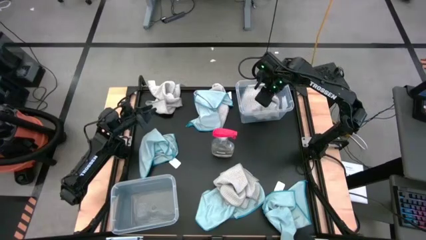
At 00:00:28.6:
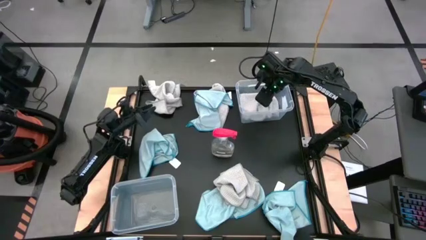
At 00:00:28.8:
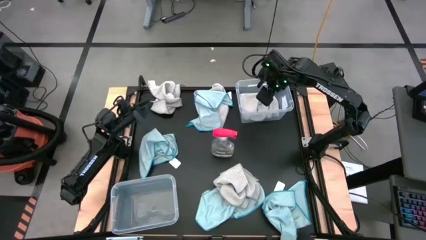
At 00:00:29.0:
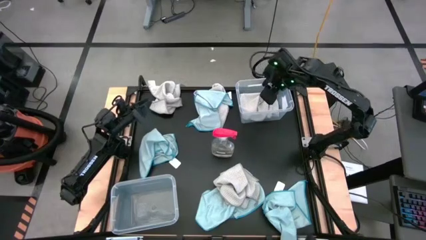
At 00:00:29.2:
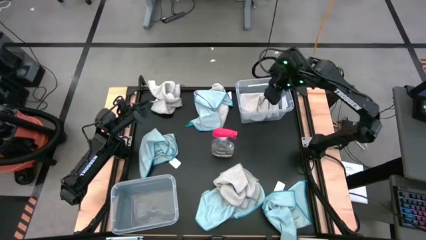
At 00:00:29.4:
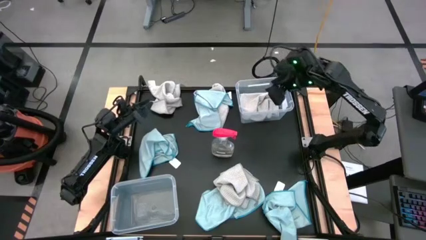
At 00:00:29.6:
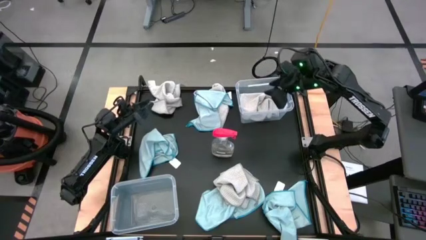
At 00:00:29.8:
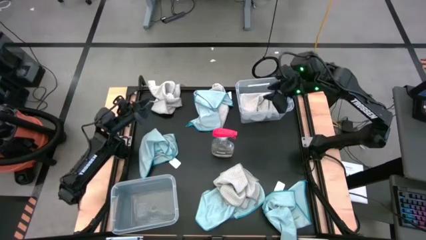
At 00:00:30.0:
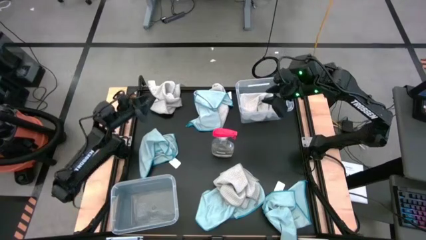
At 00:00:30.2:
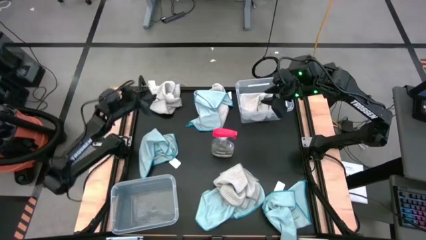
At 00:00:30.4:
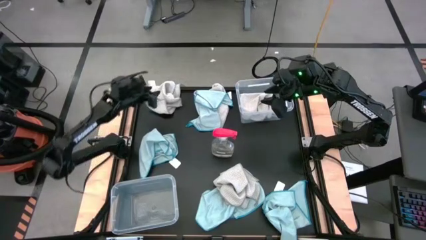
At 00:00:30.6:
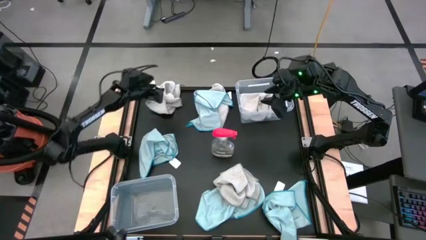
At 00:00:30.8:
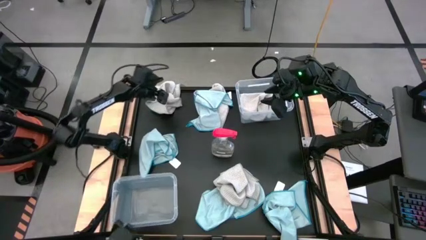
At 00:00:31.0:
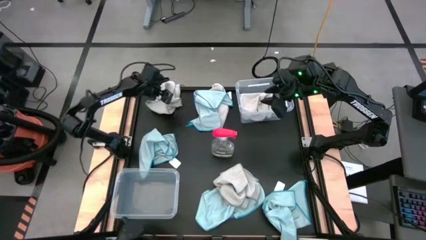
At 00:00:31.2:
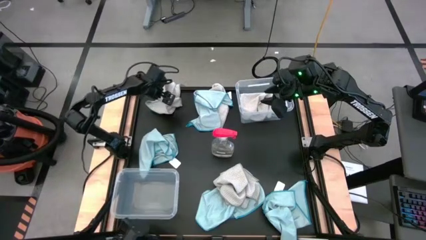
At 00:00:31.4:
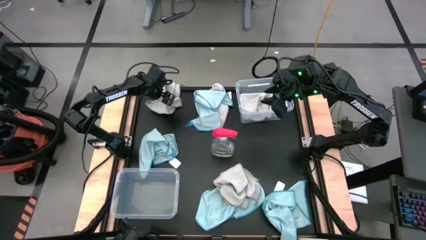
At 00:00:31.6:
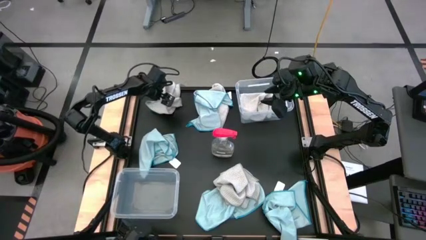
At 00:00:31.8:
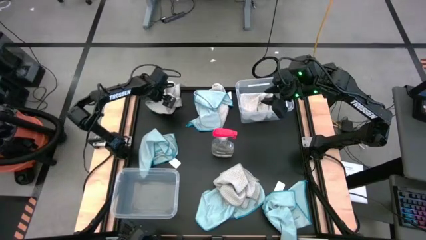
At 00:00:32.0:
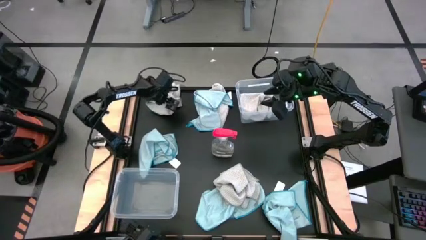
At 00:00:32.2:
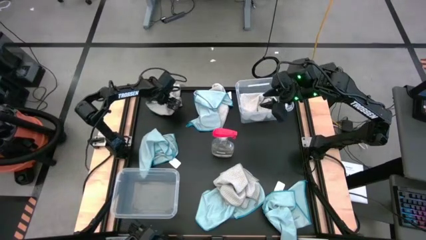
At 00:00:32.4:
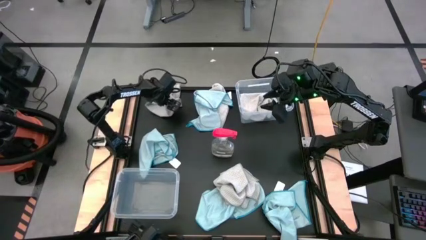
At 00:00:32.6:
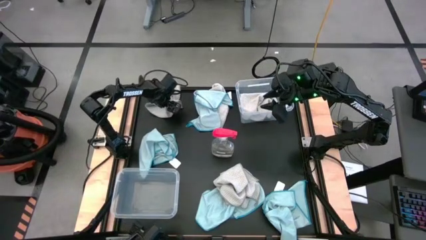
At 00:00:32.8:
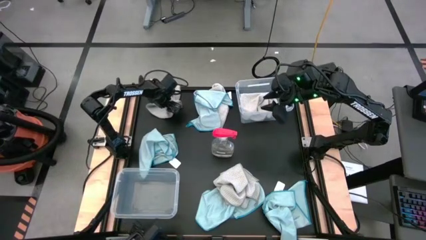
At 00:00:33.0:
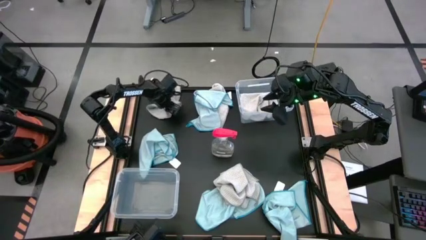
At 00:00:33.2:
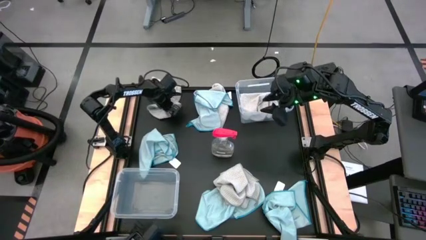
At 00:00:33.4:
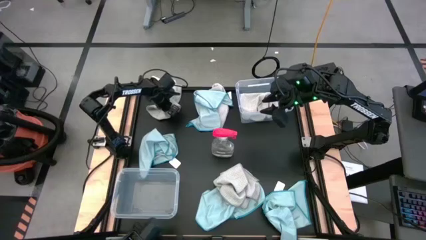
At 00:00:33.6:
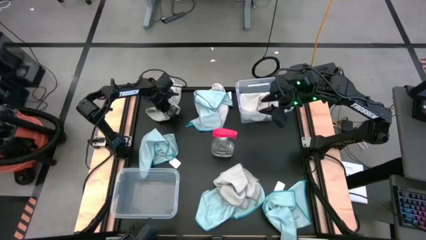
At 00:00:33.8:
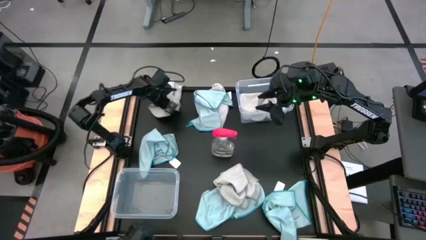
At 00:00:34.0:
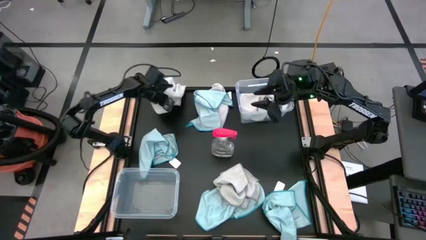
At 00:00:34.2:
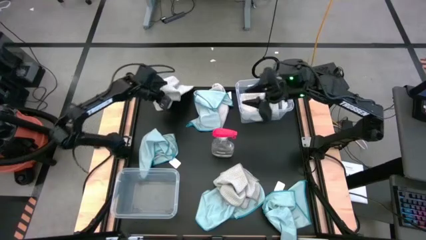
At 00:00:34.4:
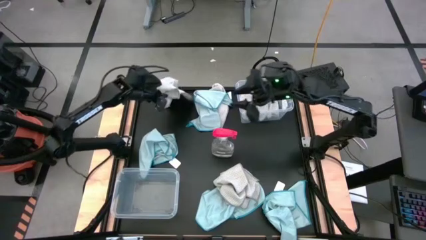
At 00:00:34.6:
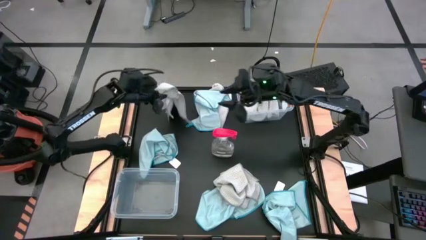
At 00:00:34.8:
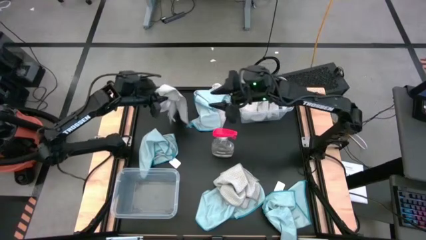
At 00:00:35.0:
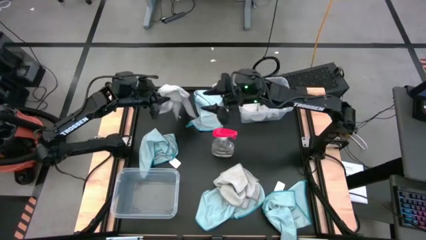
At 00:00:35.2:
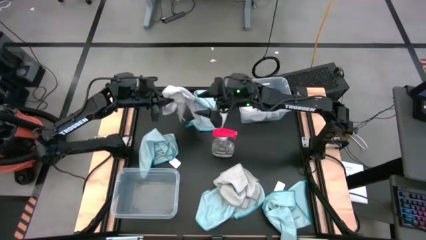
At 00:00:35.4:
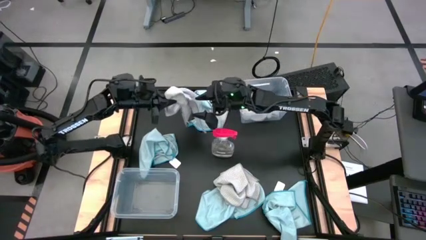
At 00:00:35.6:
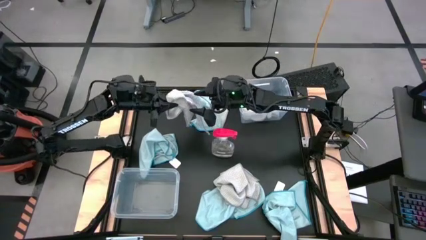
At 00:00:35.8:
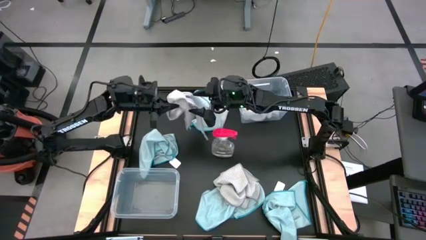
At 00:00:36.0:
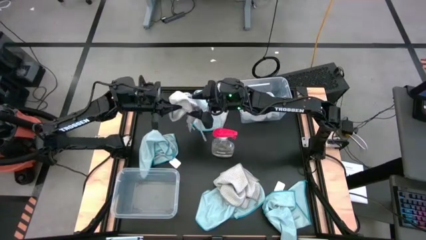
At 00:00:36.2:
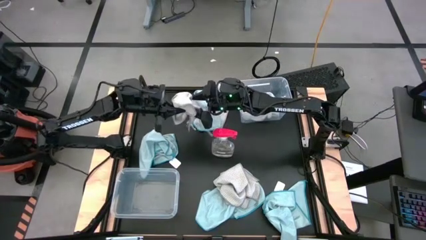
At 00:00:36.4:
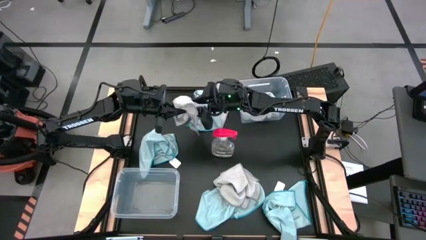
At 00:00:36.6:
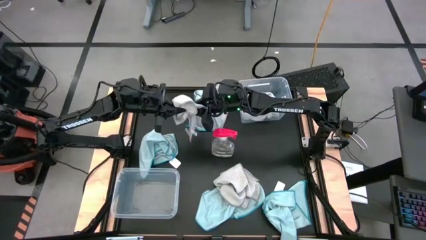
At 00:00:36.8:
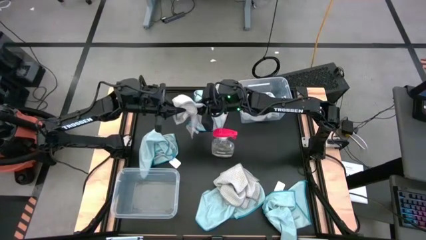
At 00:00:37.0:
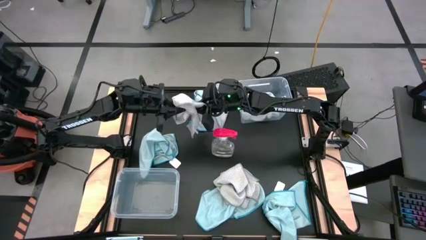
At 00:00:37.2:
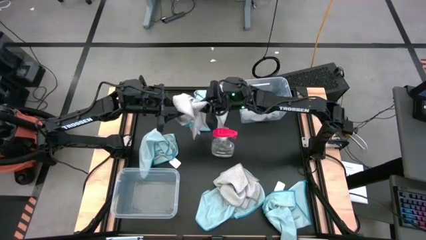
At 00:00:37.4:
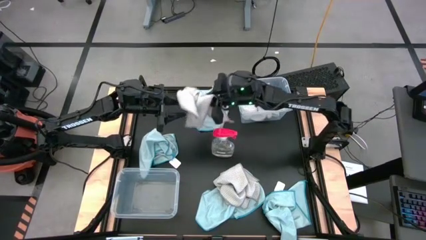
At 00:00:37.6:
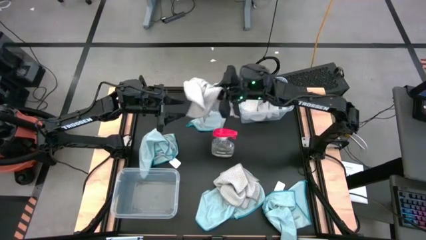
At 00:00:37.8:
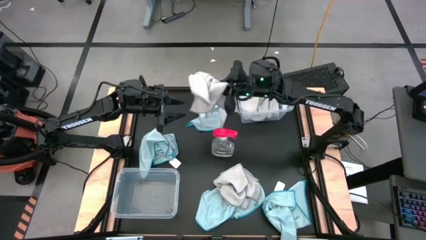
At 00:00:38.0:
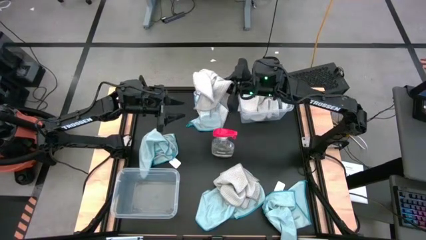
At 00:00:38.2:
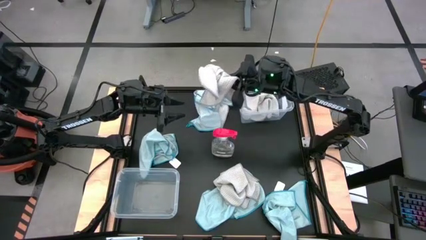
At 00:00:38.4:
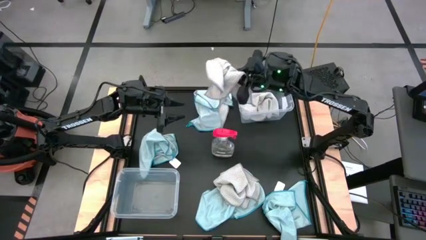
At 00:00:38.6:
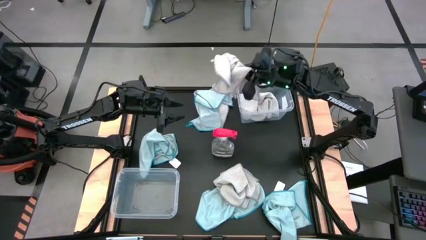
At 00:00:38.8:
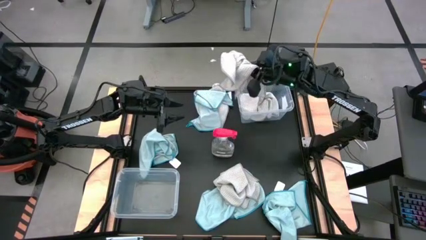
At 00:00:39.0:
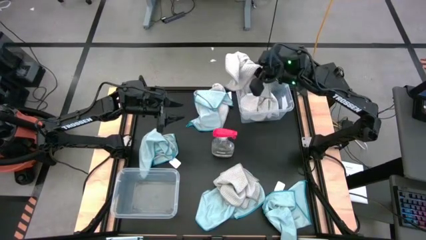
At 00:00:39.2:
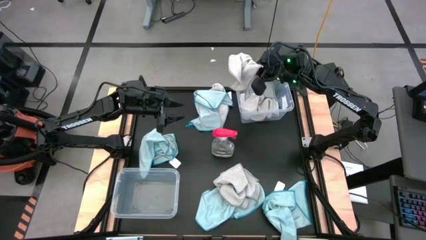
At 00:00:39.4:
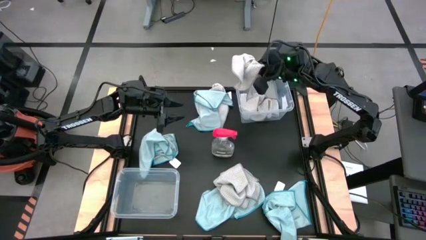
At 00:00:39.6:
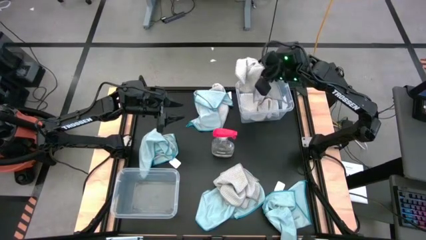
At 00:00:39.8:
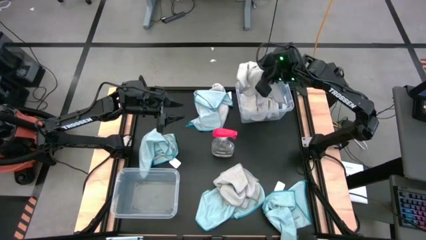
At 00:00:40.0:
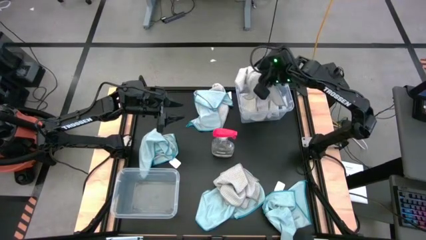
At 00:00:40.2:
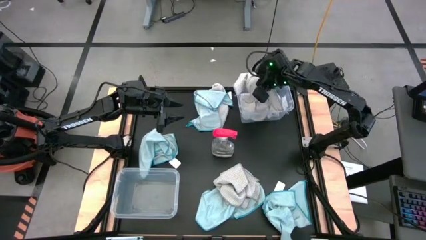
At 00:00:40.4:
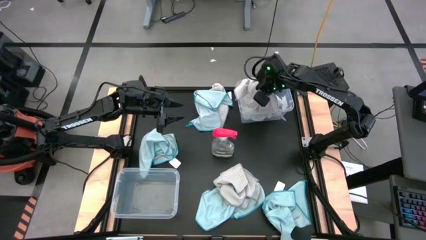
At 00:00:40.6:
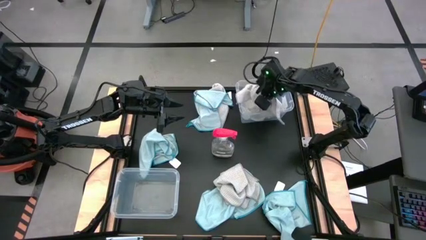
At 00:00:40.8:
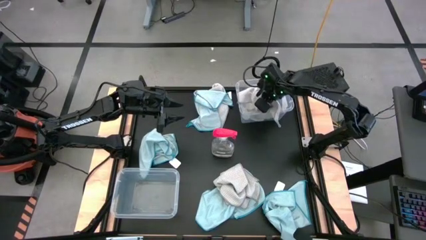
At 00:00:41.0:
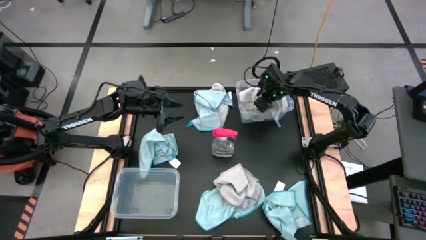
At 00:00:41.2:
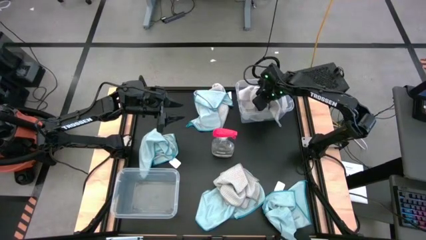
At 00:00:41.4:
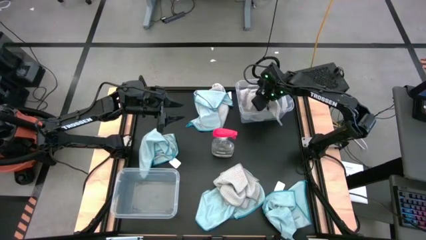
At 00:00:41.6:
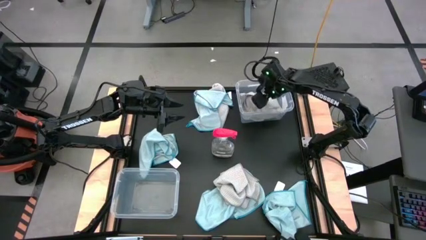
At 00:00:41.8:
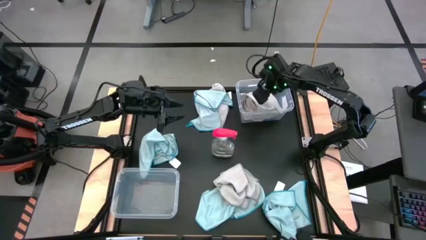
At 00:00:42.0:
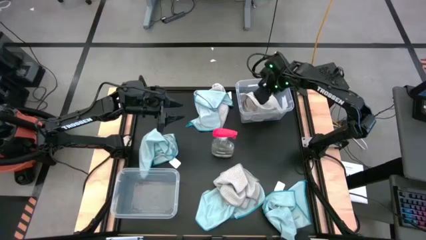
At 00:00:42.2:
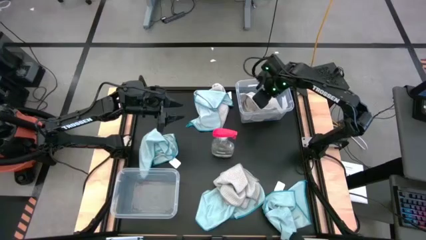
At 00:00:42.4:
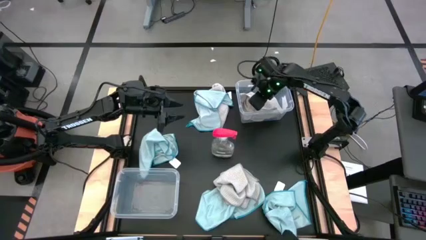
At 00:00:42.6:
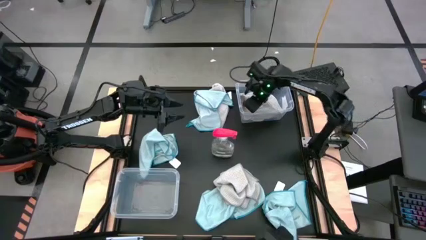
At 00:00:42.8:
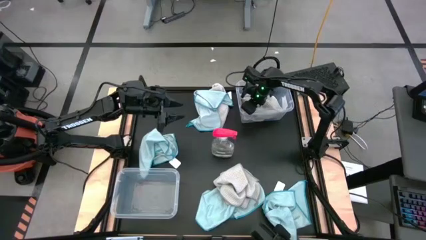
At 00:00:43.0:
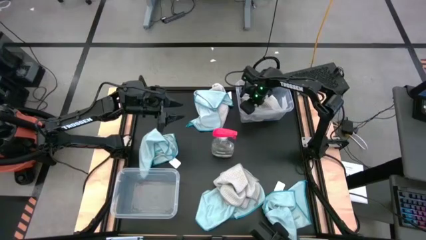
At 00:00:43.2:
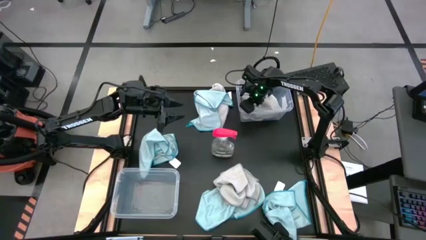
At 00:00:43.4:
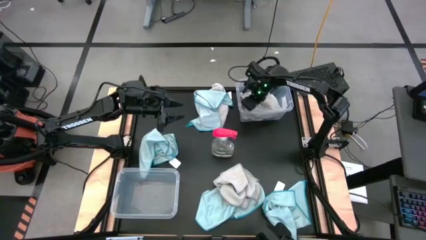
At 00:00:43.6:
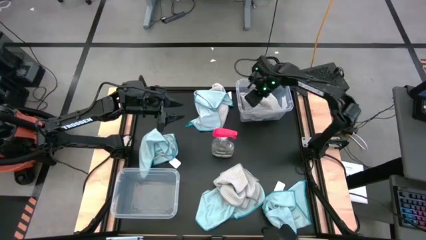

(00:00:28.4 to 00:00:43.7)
Task: Sort microfiber towel by color & place in baskets
Put the gray towel into the top transparent bin
